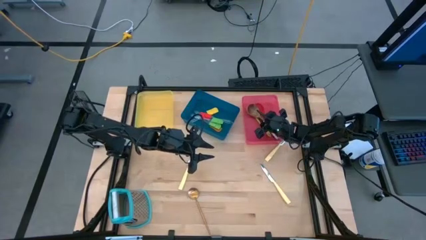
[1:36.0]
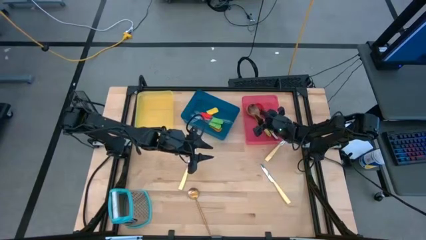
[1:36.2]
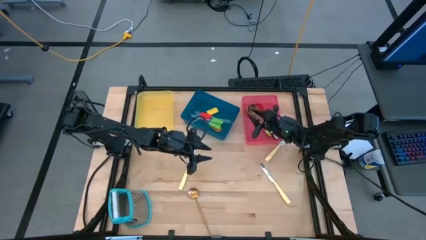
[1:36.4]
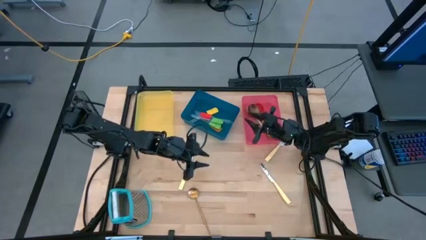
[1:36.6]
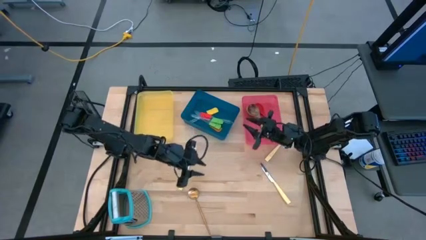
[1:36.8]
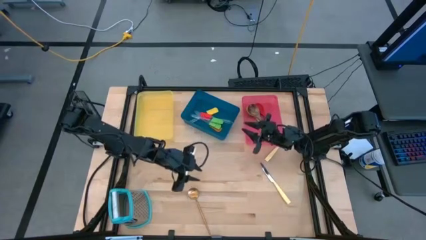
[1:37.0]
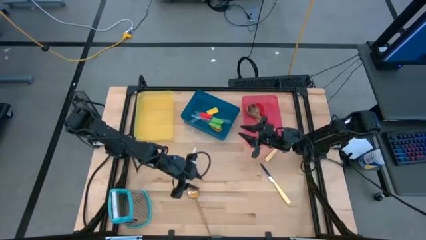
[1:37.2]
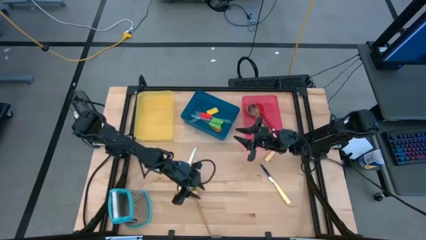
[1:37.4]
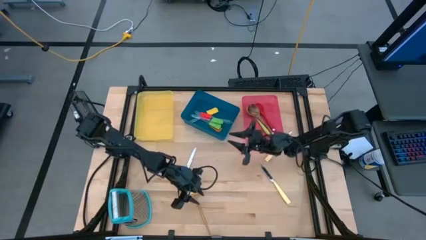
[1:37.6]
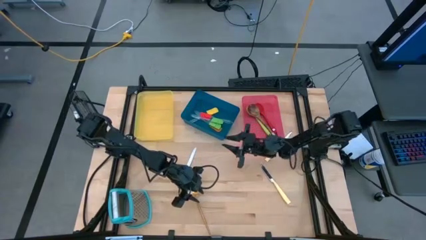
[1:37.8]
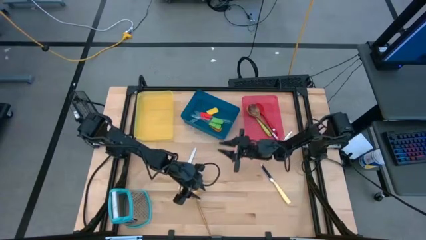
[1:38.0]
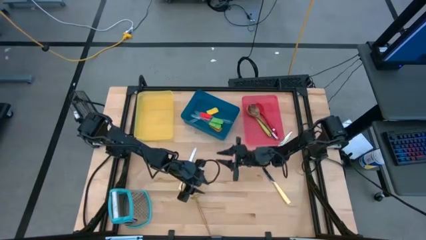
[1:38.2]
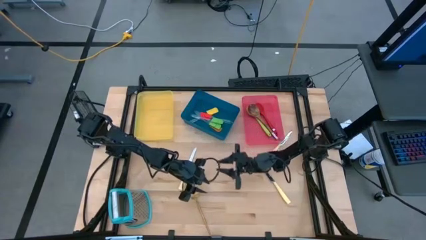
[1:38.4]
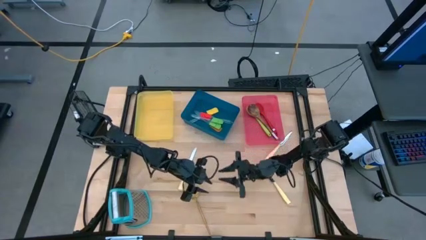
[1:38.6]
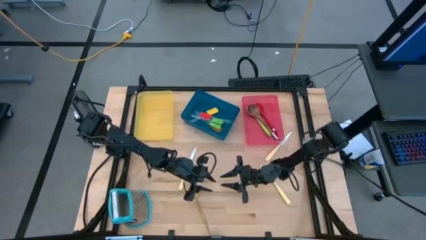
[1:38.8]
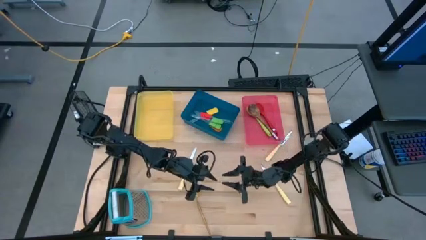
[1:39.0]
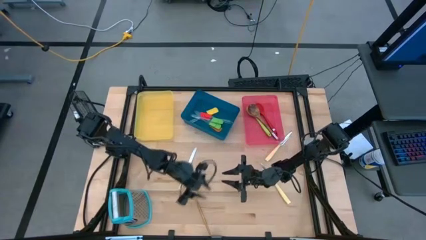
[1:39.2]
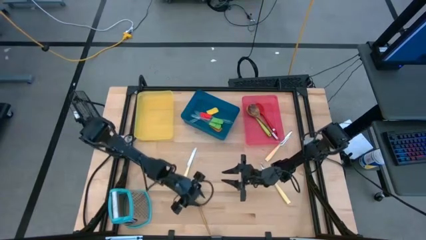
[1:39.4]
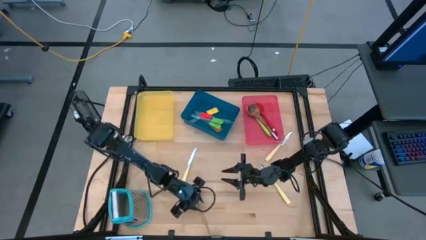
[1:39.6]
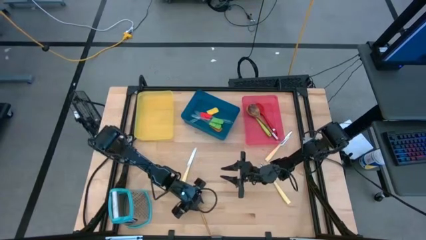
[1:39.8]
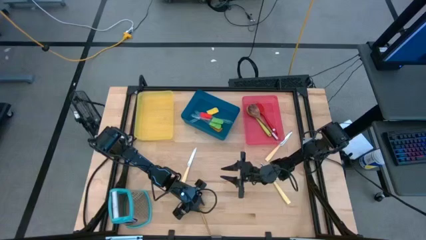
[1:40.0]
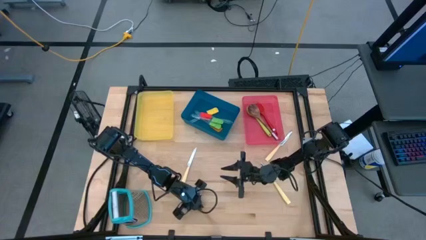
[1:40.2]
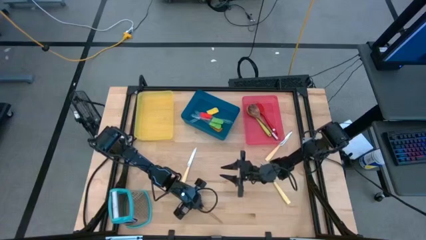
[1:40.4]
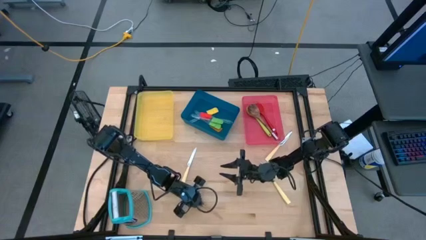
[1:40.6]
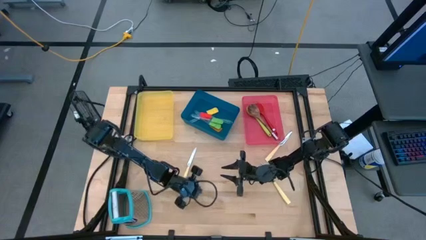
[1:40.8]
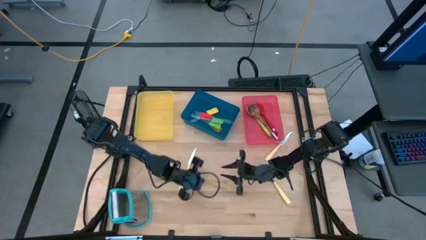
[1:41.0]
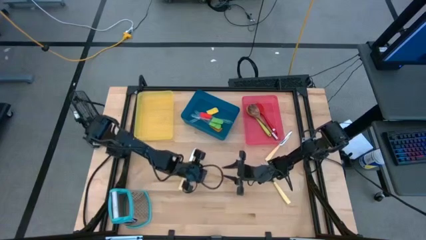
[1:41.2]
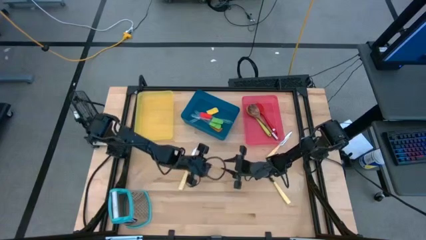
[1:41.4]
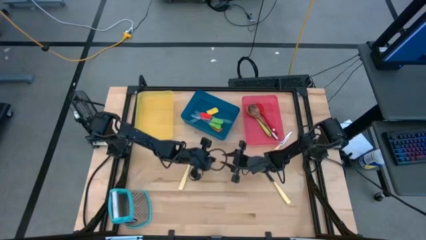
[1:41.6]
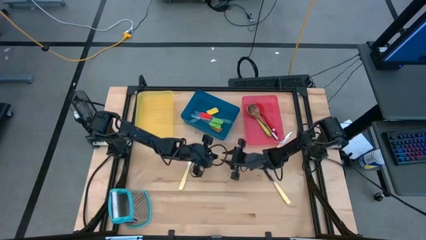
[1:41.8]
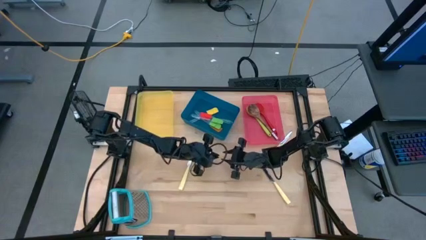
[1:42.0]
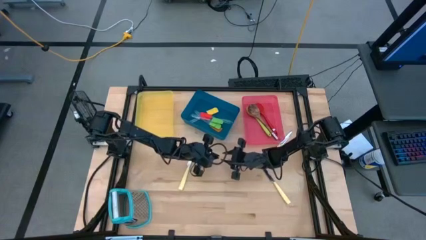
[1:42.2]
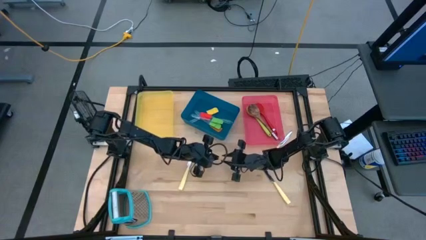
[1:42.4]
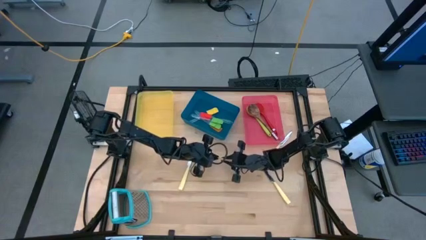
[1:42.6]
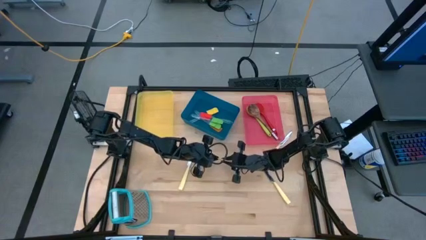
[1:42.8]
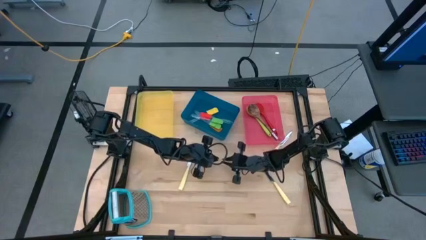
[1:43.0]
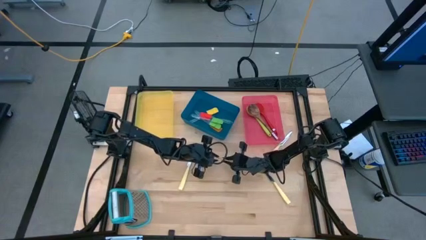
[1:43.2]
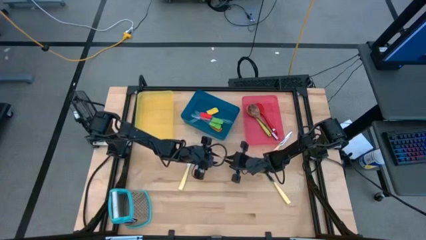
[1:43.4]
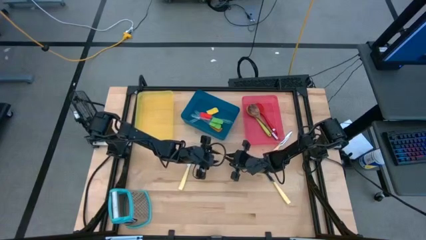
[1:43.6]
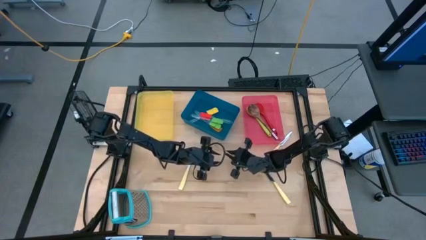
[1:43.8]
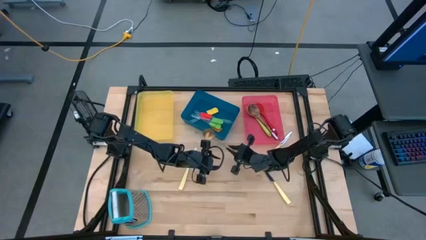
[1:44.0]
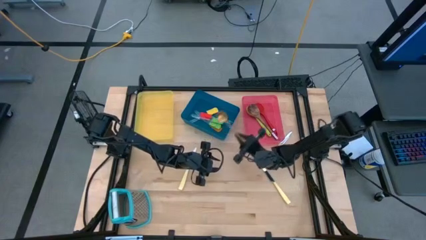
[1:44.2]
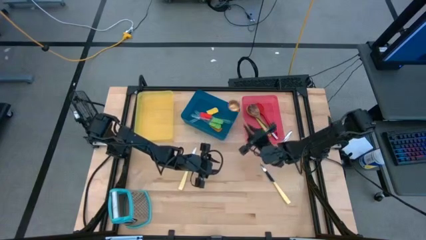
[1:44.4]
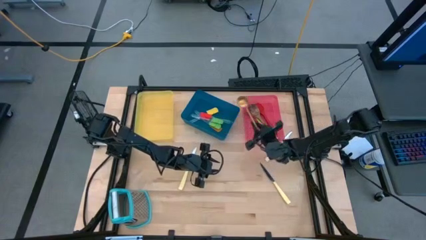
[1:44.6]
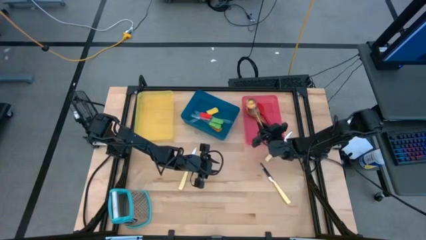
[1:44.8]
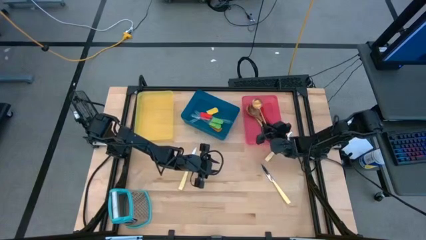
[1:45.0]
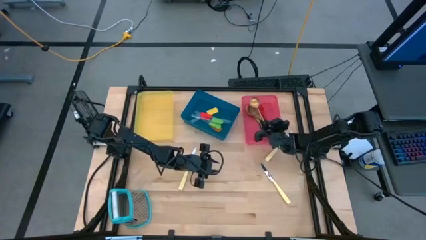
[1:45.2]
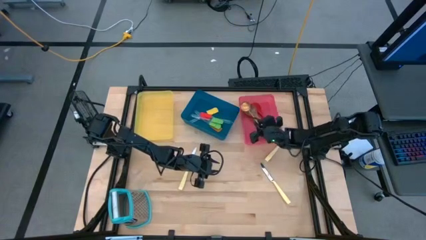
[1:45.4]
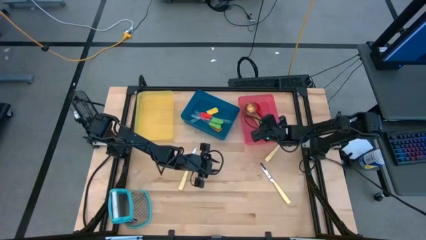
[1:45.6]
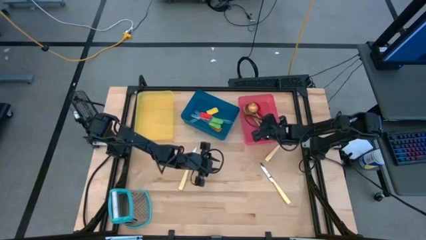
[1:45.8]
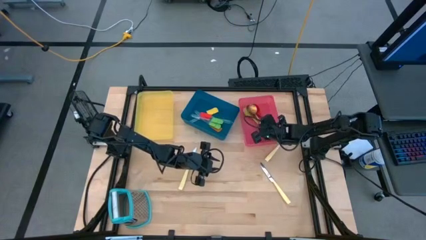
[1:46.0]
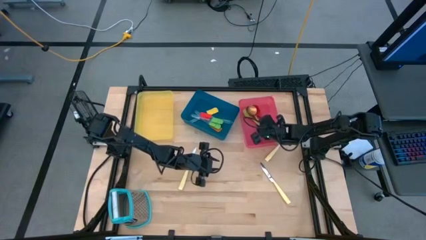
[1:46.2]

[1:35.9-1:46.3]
Task: Pick & Place Kitchen Items
Put the golden spoon into the pink bin

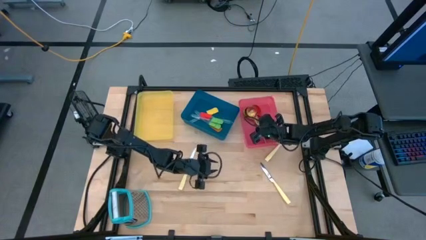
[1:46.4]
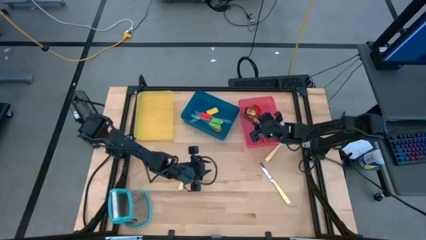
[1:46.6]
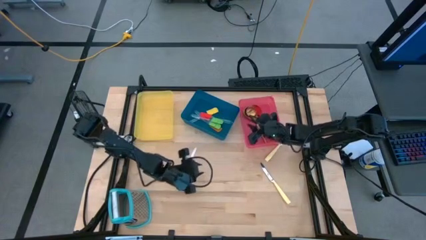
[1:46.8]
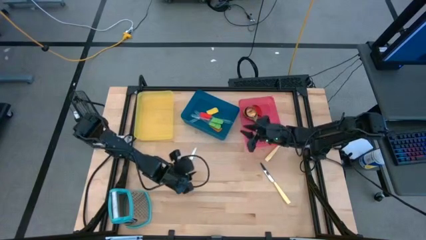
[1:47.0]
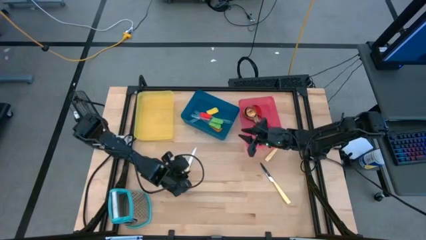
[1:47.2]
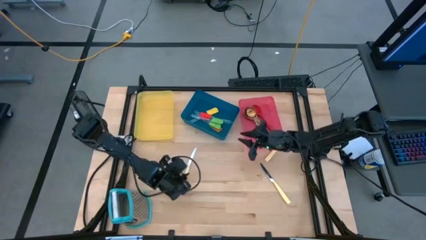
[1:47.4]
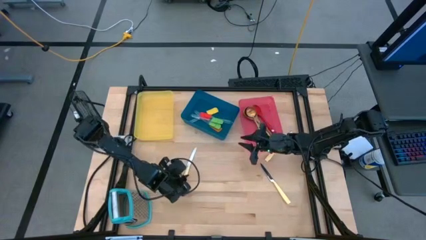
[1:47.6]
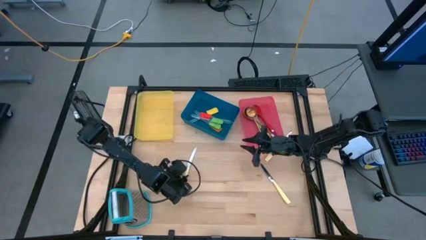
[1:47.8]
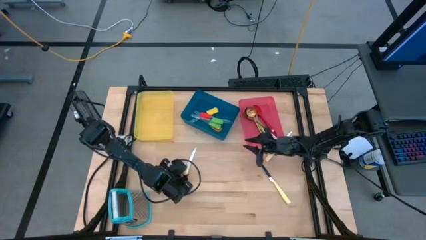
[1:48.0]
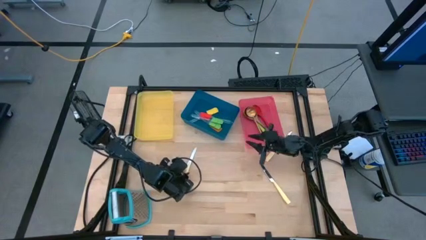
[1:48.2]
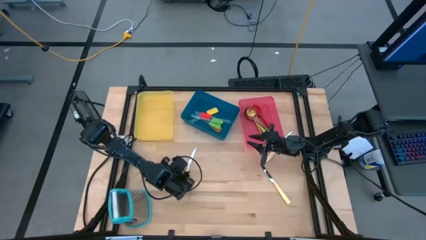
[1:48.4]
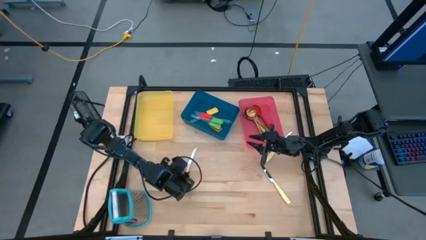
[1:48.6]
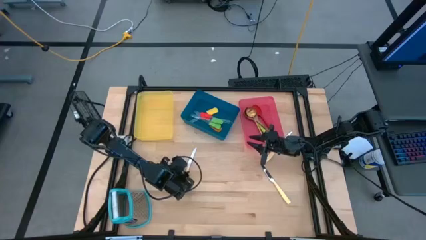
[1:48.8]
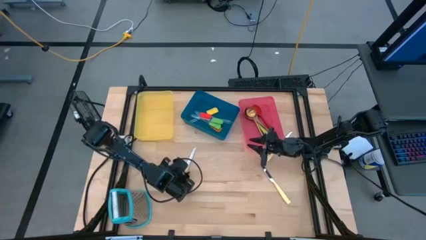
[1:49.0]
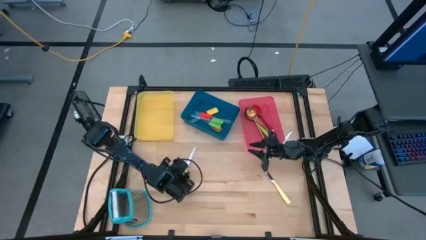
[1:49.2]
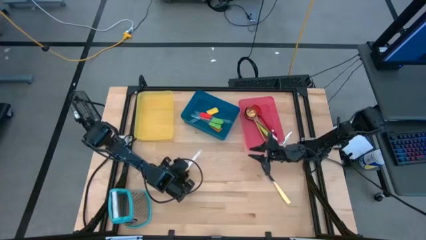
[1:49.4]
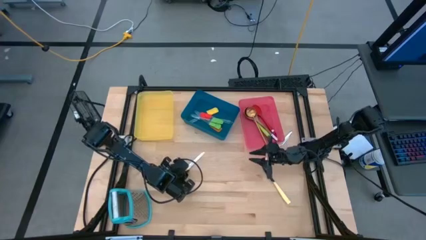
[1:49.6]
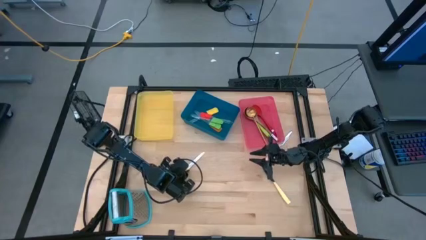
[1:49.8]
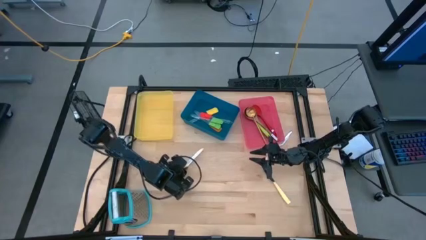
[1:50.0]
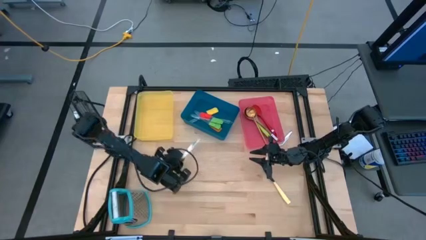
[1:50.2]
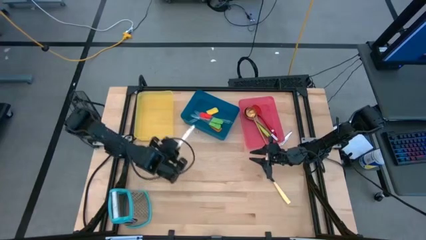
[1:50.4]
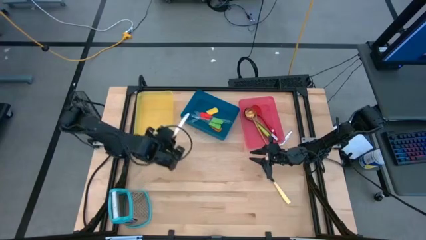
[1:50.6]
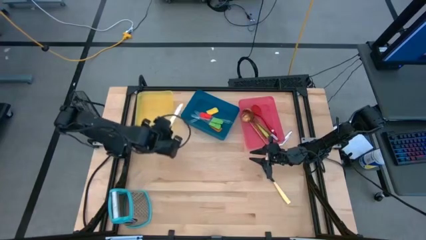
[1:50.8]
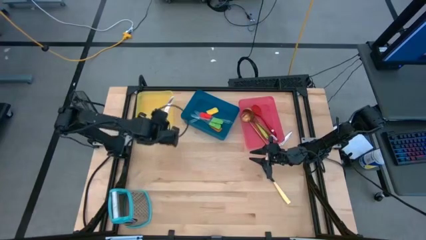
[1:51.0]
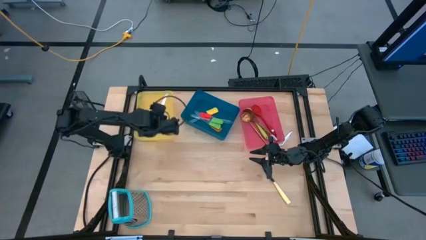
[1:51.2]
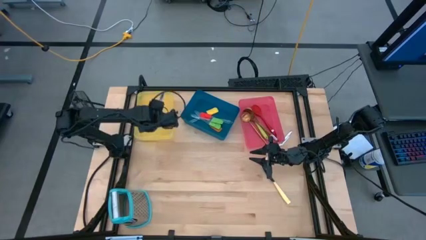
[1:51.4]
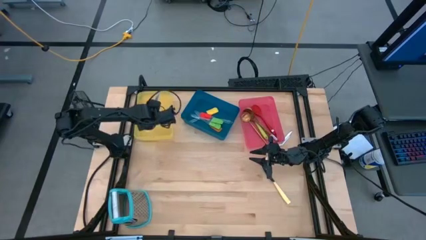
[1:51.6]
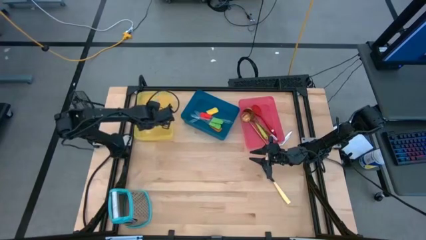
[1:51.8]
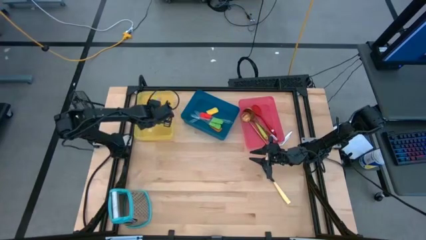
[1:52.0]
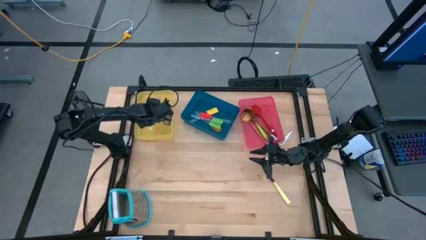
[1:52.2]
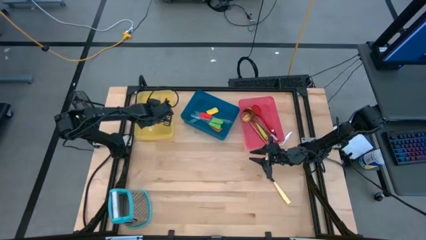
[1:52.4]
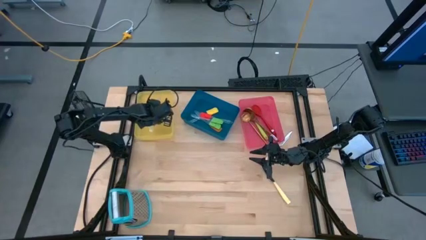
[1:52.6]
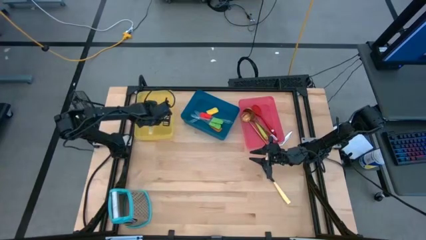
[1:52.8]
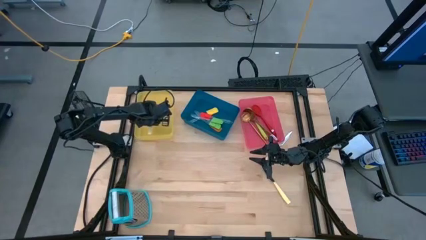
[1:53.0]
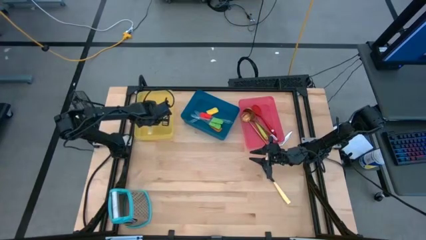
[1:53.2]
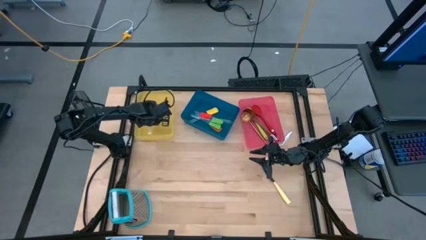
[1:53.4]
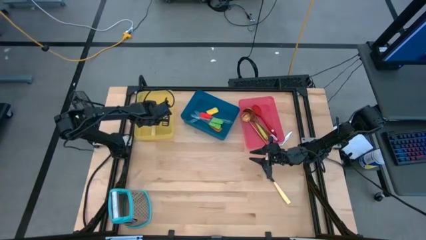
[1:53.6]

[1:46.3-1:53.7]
Put the left light yellow knife into the yellow bin
